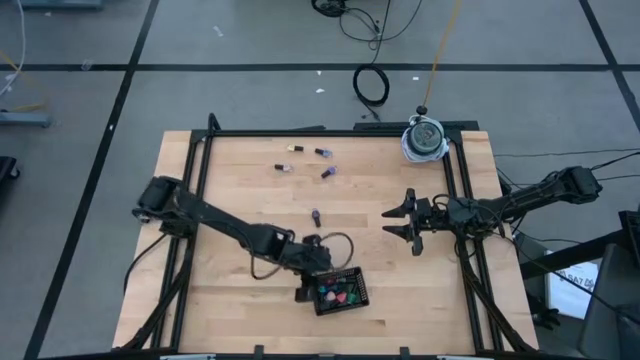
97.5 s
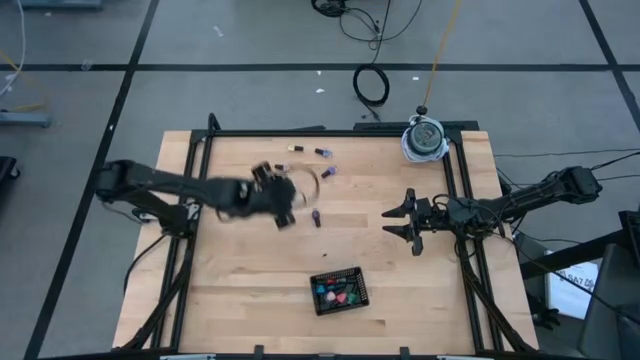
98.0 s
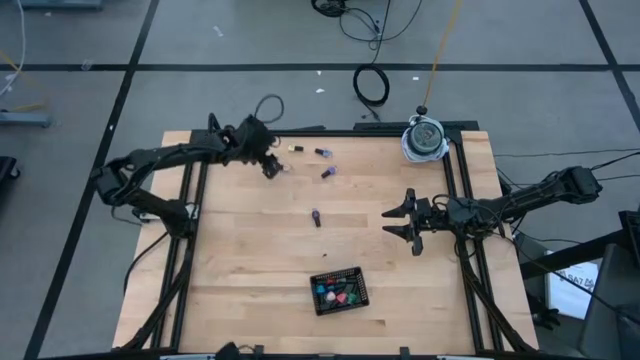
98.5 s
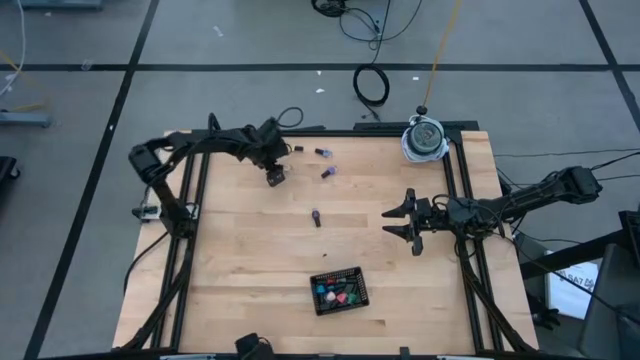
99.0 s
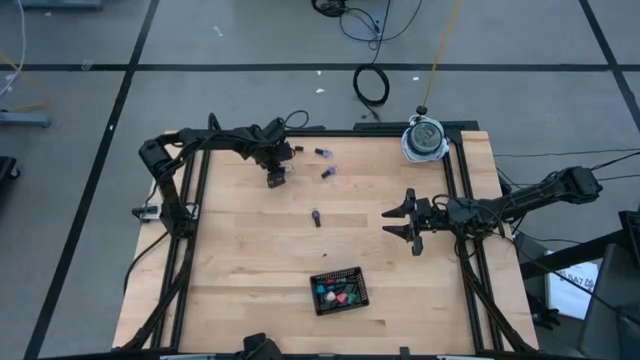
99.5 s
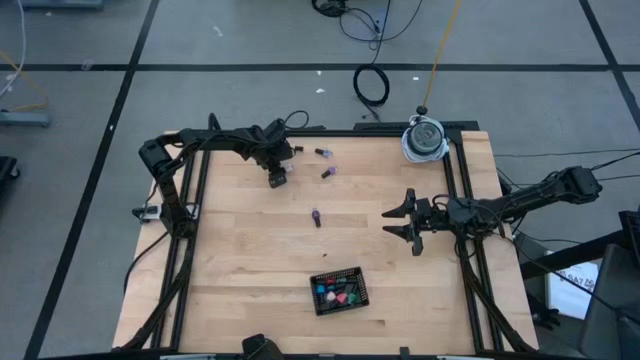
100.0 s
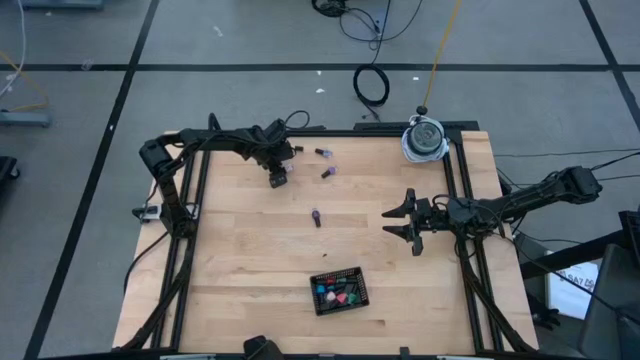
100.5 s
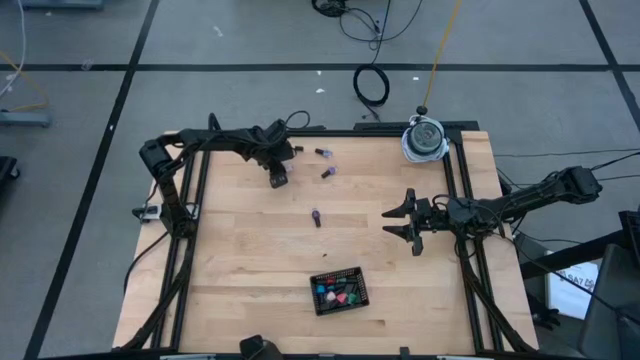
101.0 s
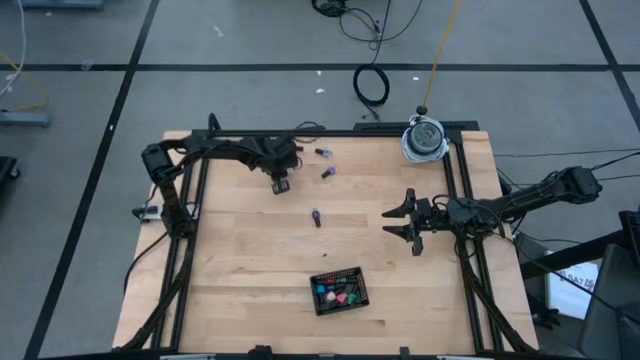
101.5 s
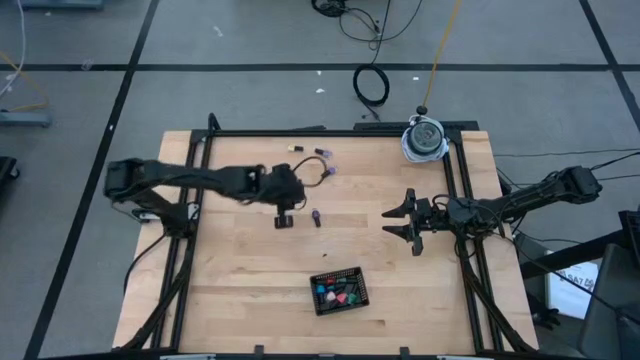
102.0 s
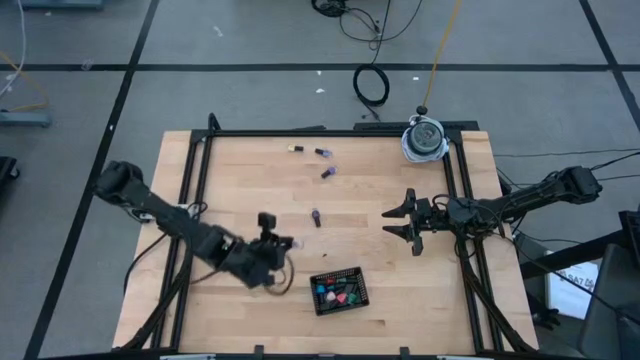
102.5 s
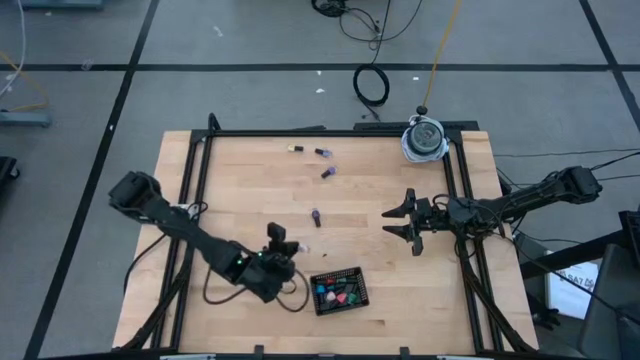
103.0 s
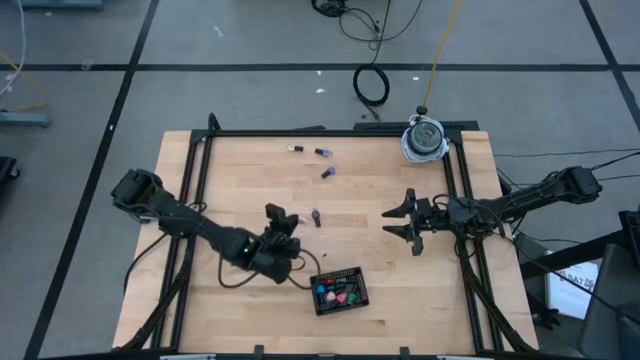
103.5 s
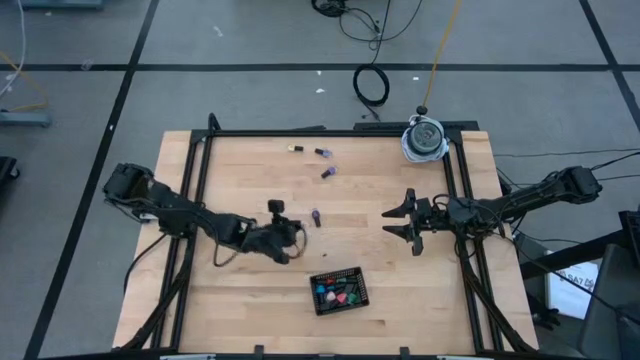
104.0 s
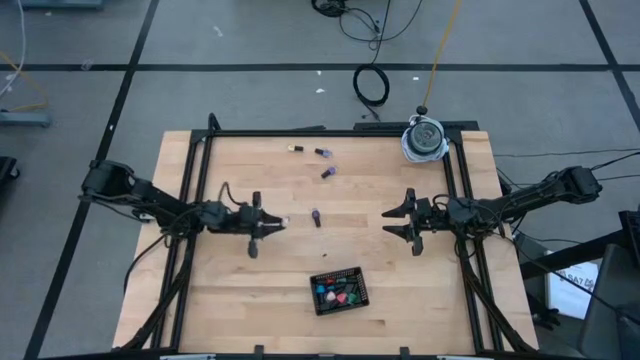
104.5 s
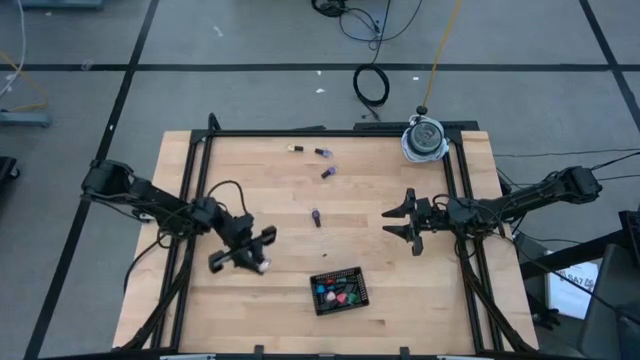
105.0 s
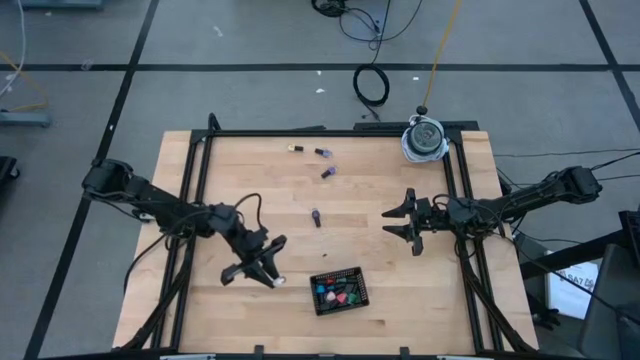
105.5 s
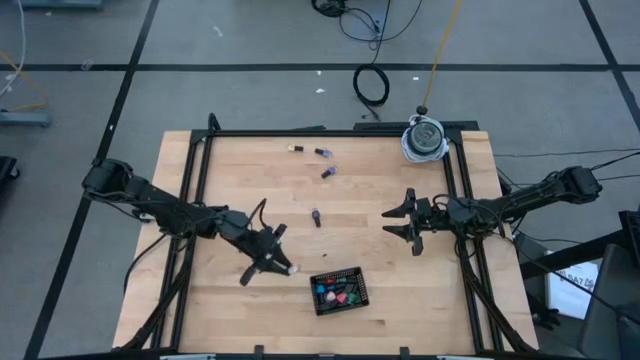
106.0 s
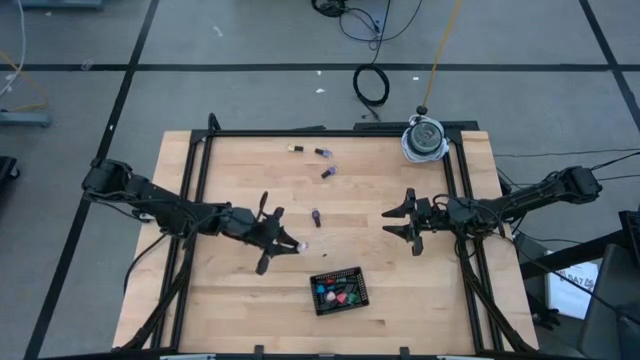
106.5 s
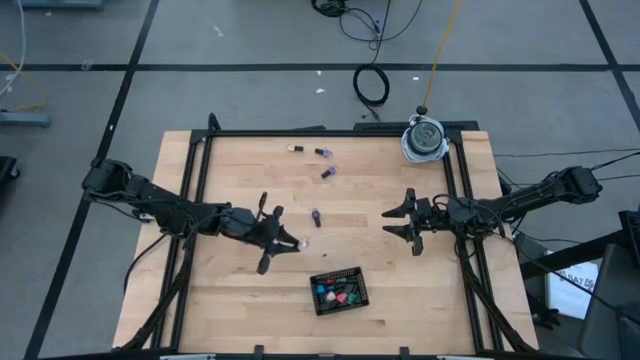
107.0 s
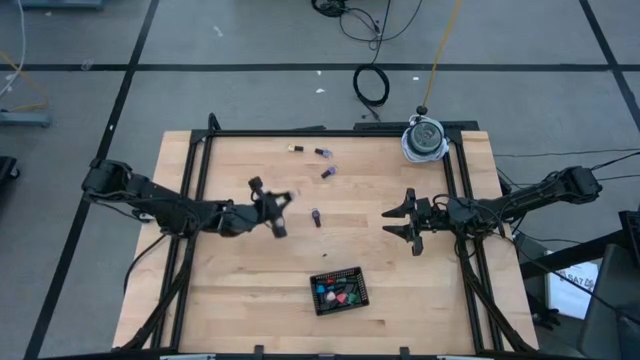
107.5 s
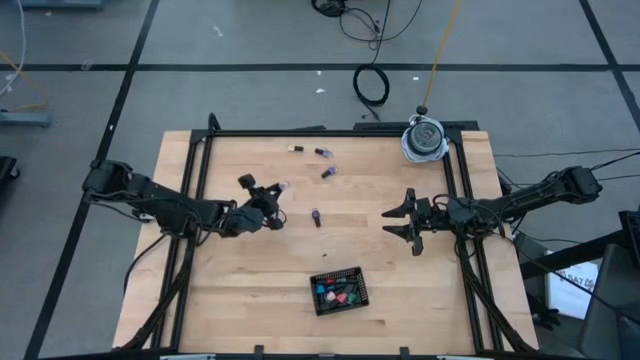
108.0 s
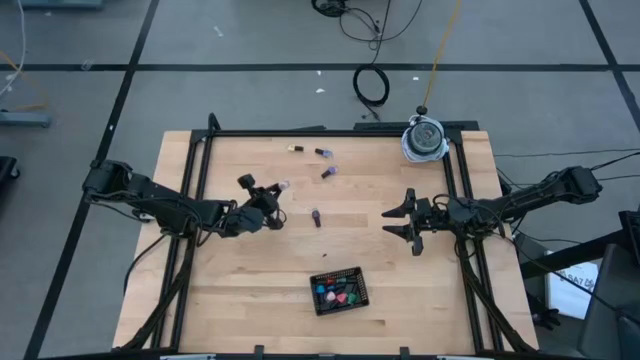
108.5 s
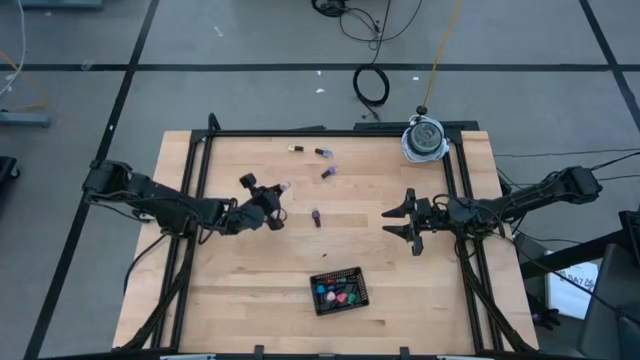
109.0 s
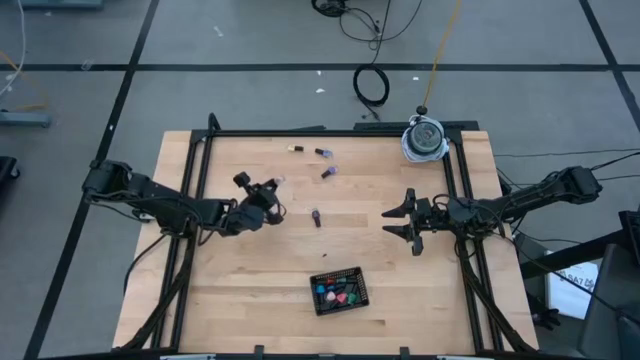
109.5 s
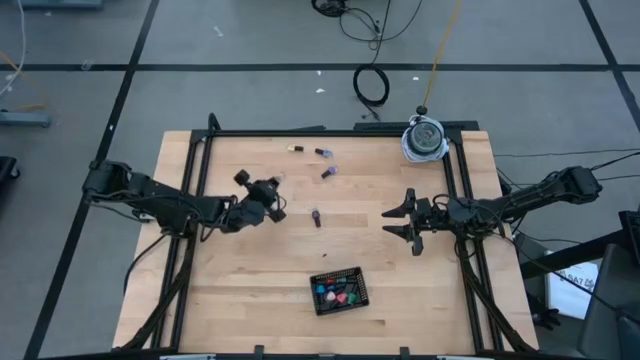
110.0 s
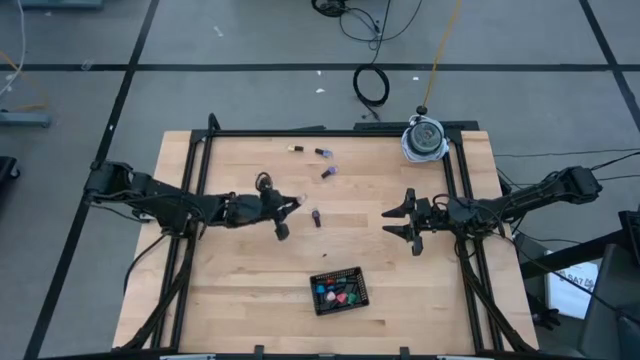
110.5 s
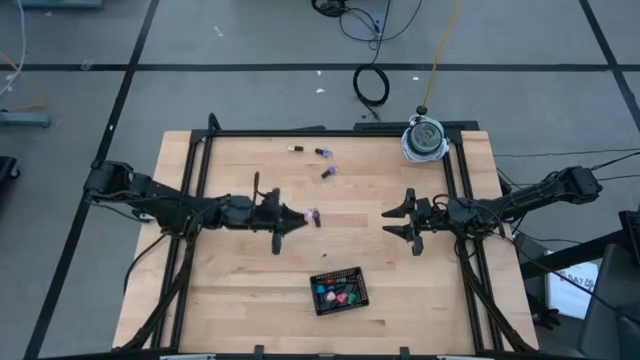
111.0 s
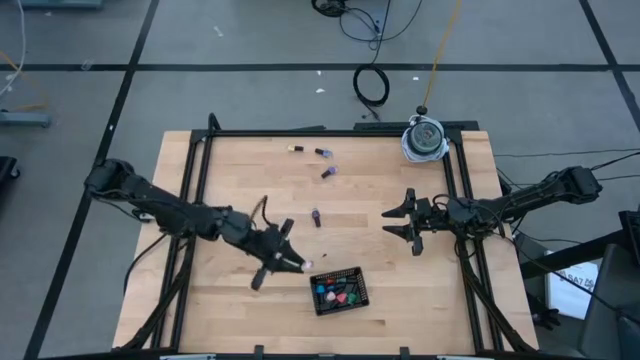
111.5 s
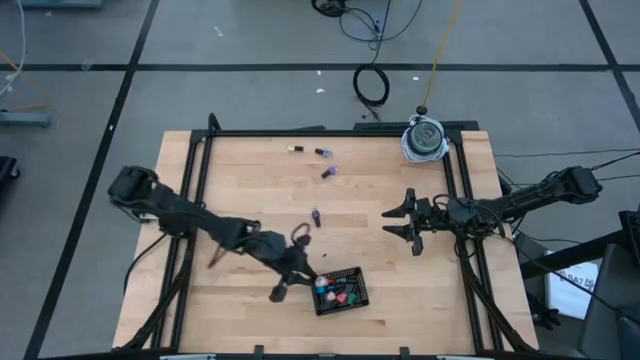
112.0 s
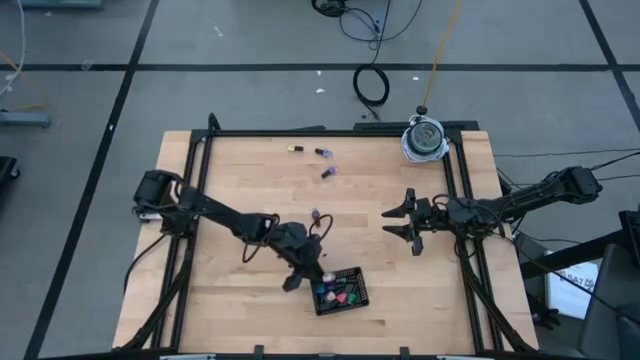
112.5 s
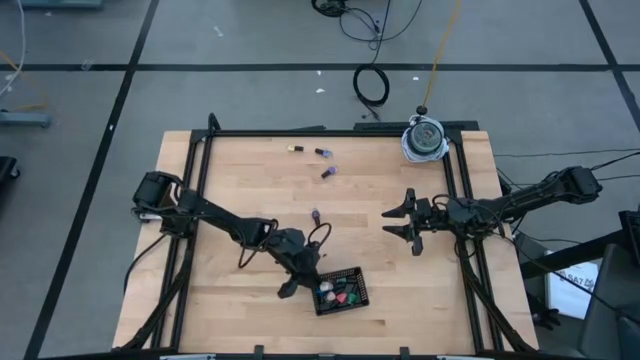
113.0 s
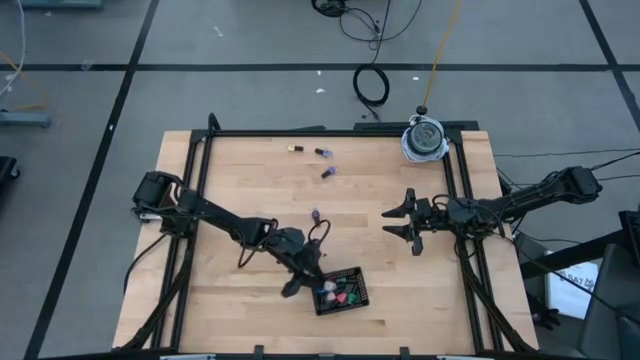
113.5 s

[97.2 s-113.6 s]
Task: Pick & Place Nail Polish
Put the white nail polish bottle into the black bin

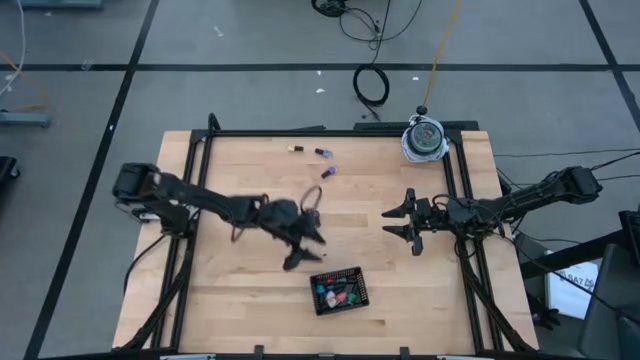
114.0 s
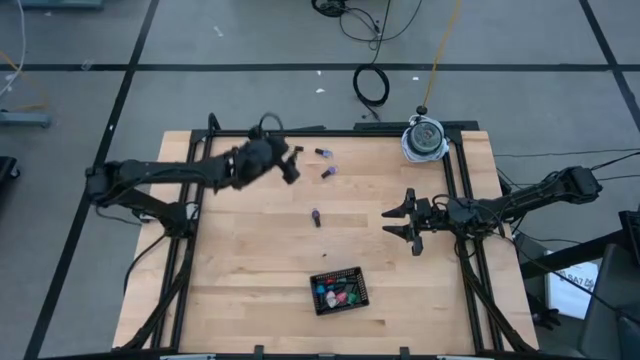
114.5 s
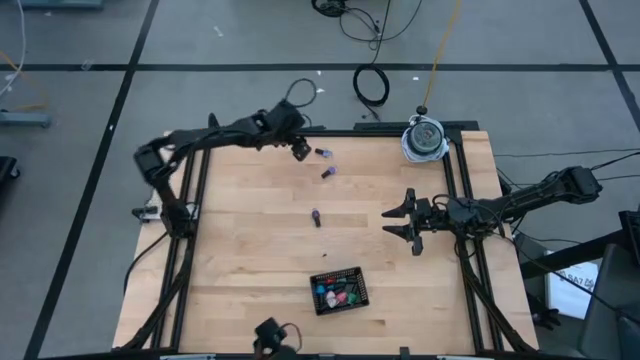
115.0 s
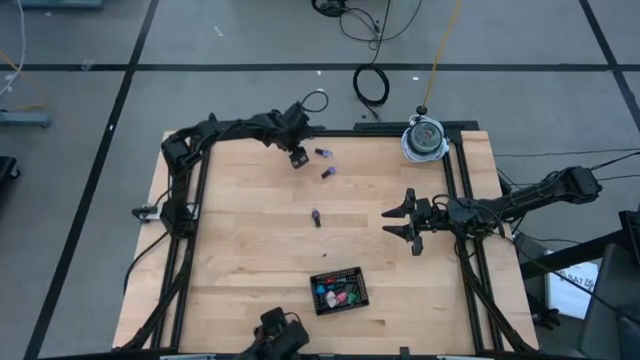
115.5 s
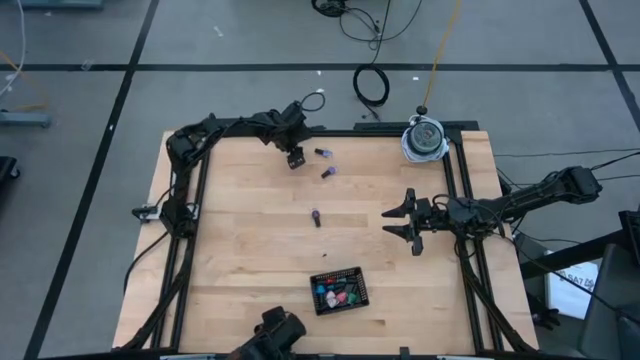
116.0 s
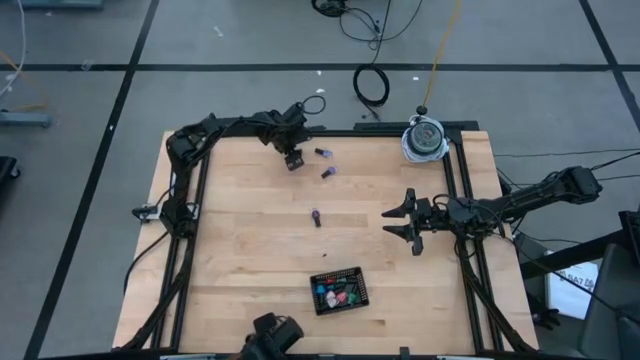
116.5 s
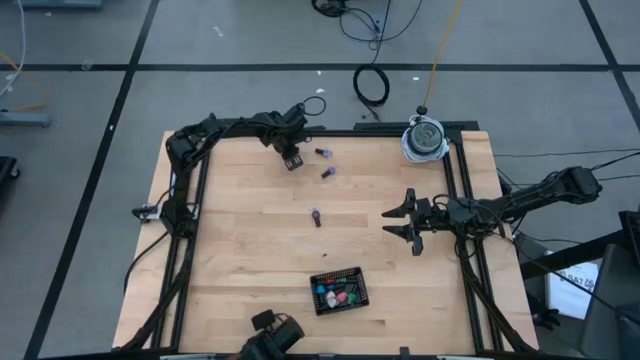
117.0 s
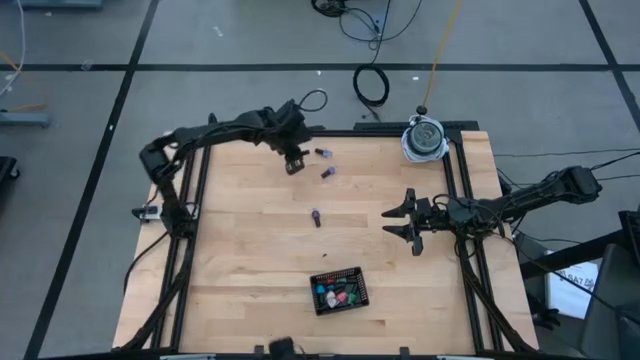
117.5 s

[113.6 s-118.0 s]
Put the yellow nail polish bottle into the black bin
